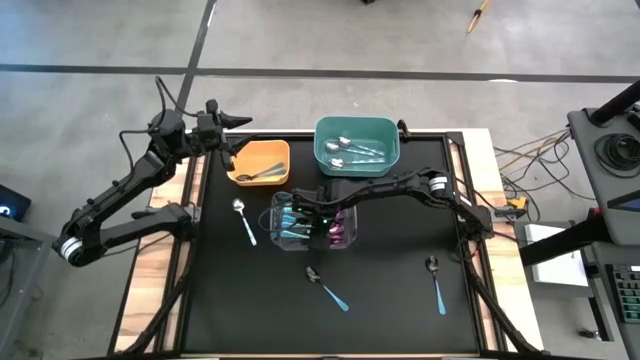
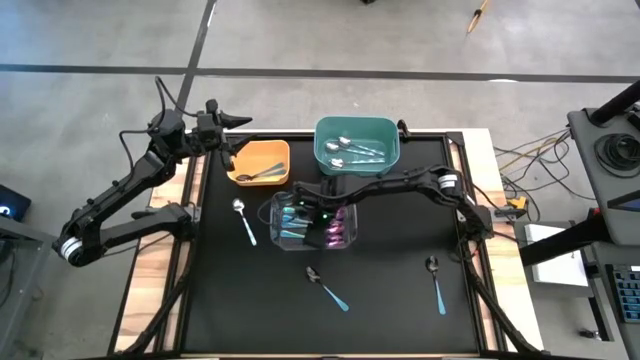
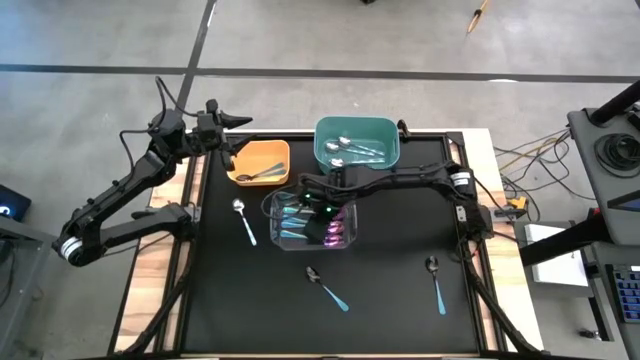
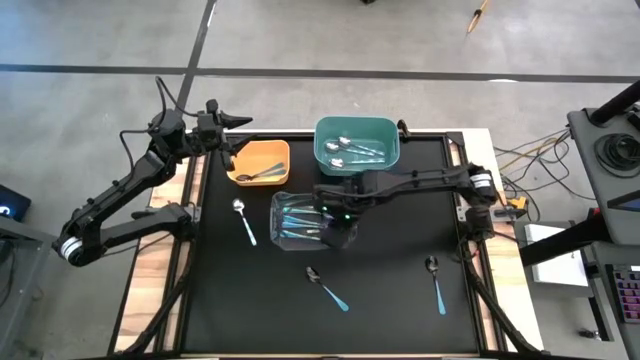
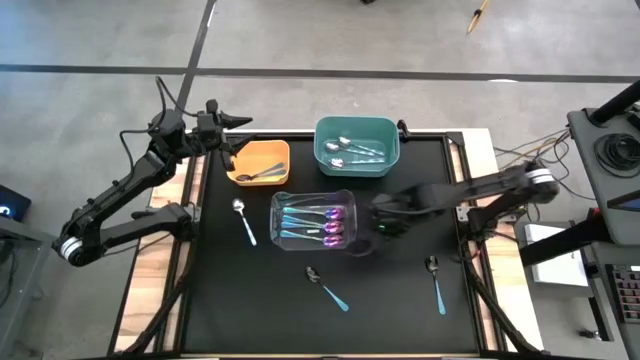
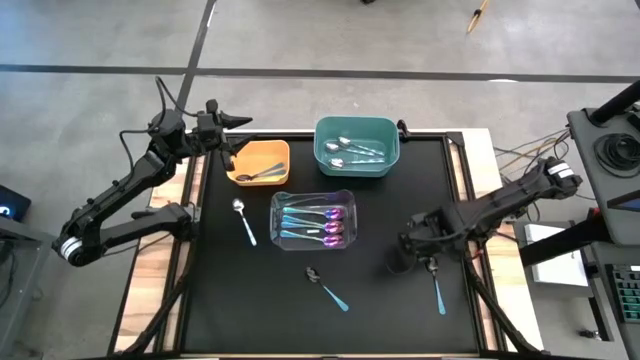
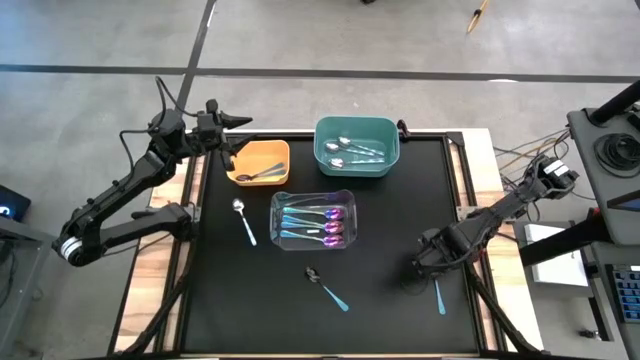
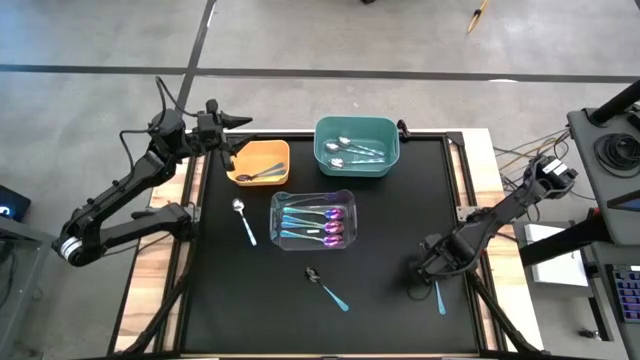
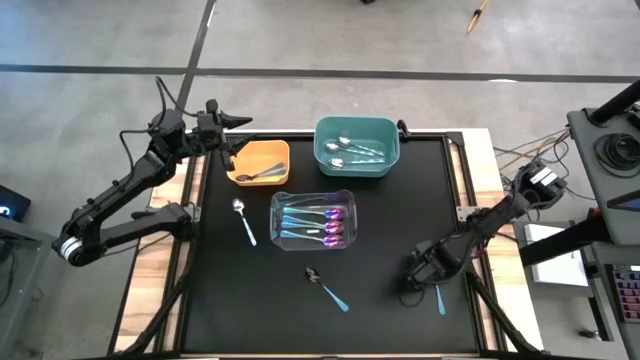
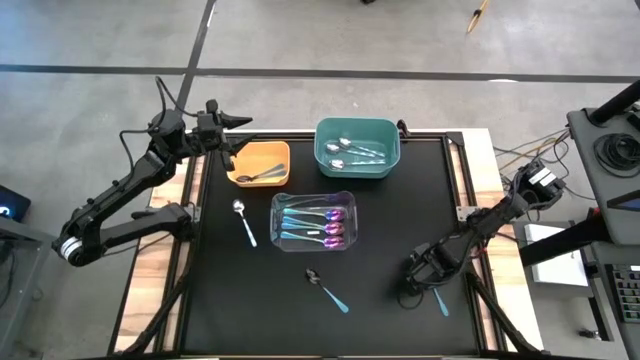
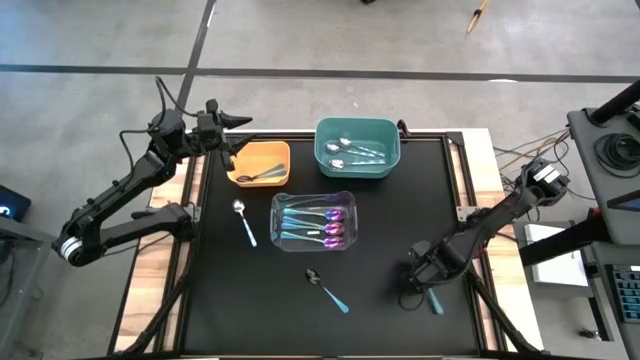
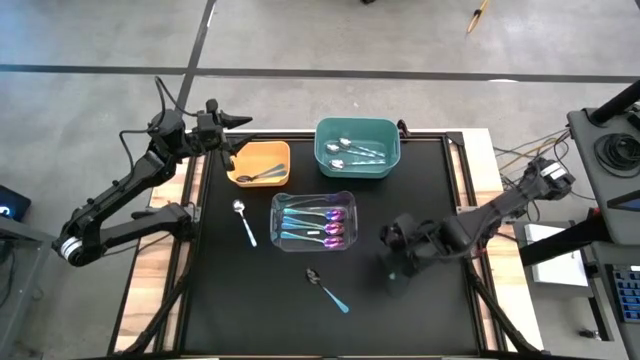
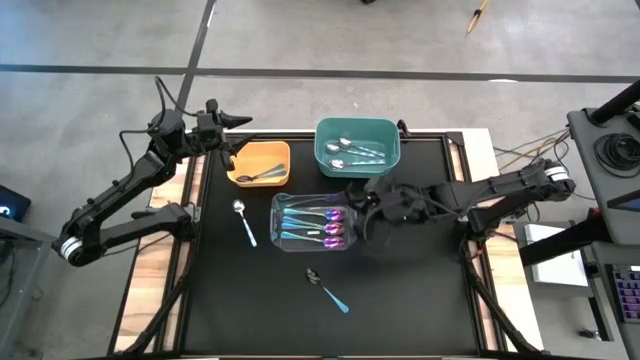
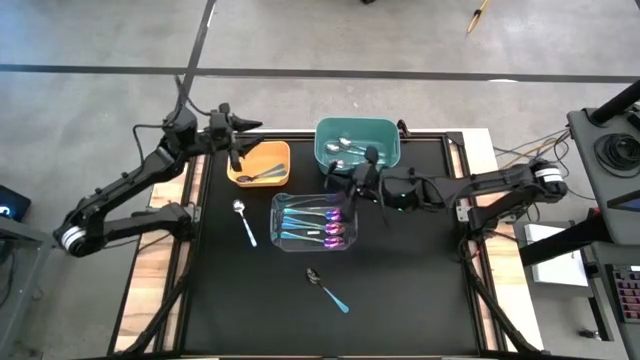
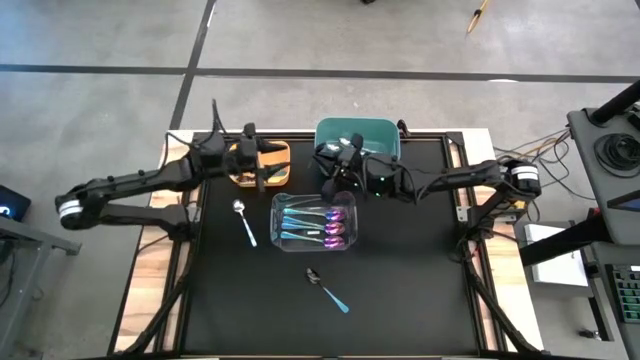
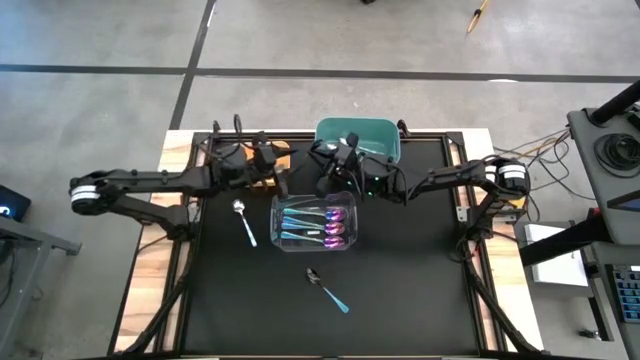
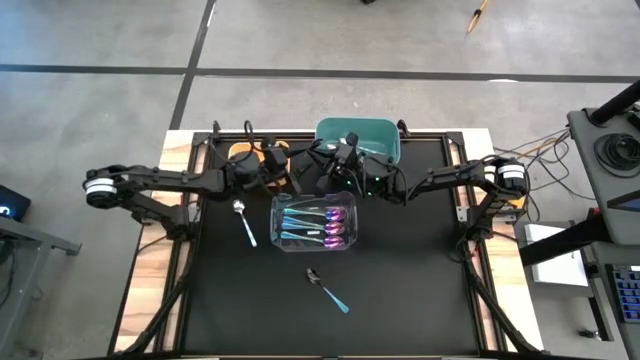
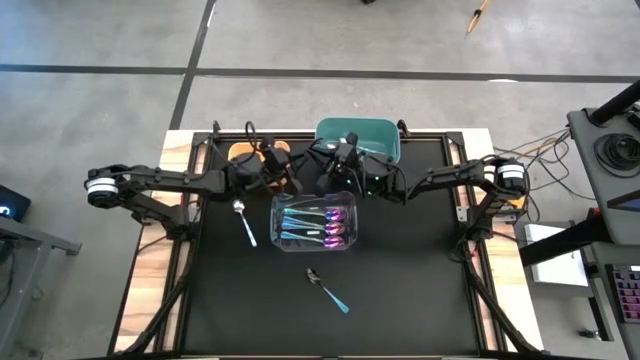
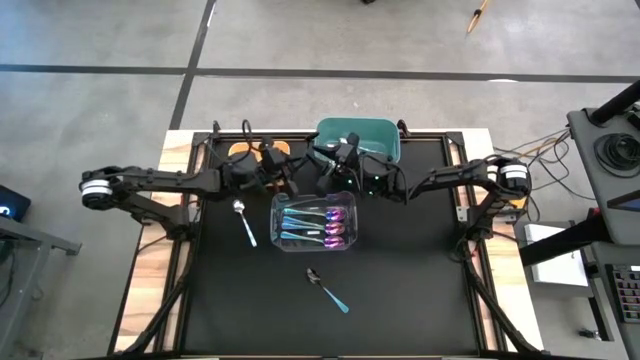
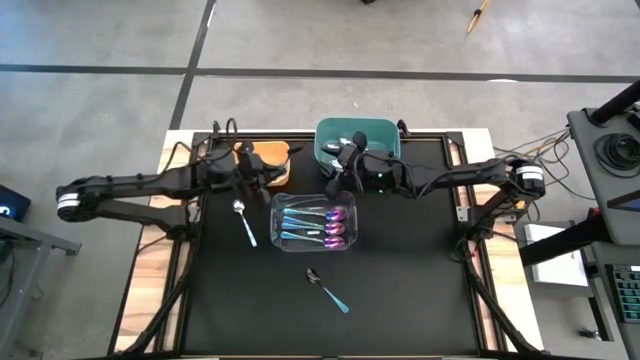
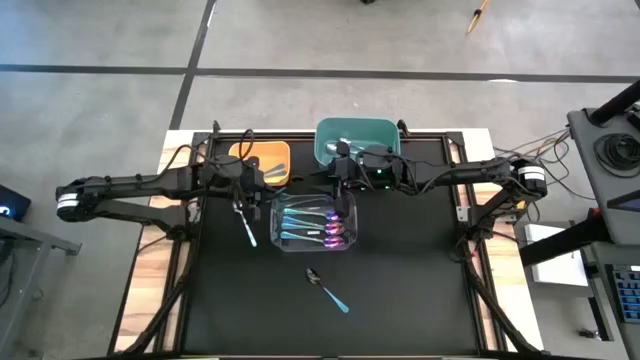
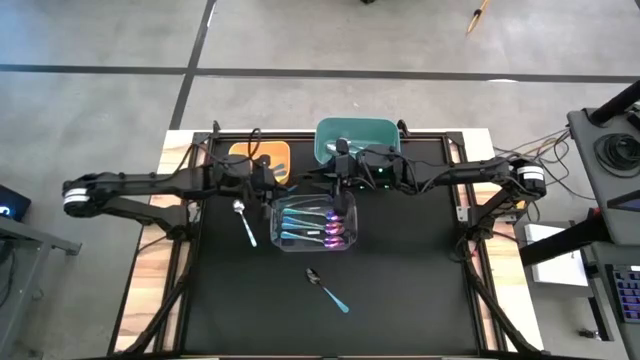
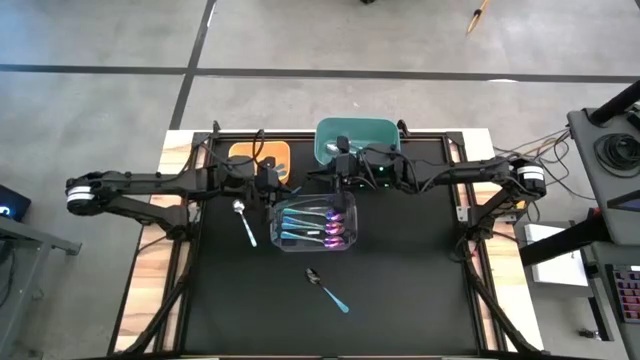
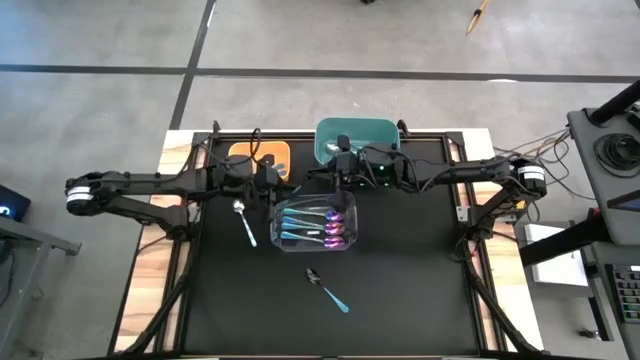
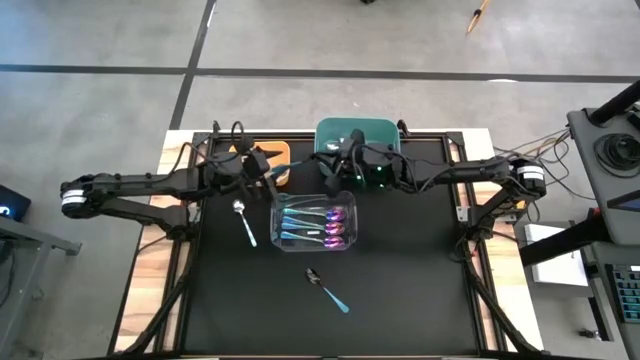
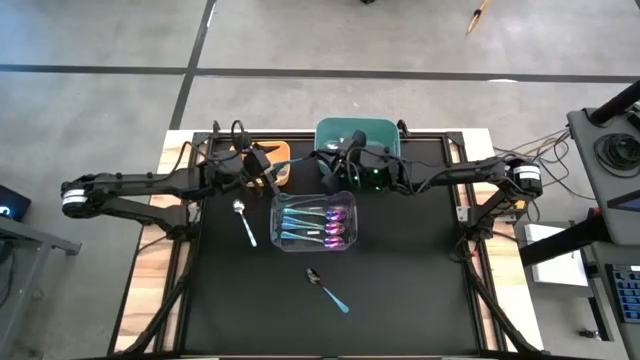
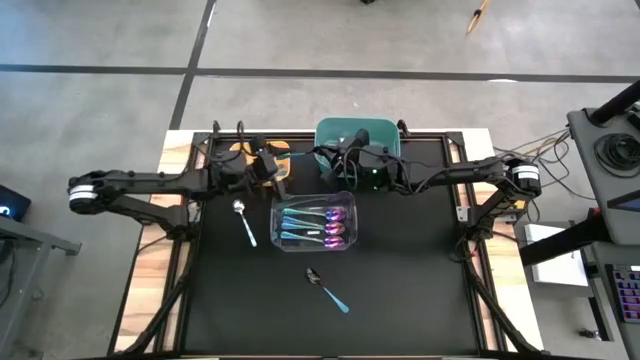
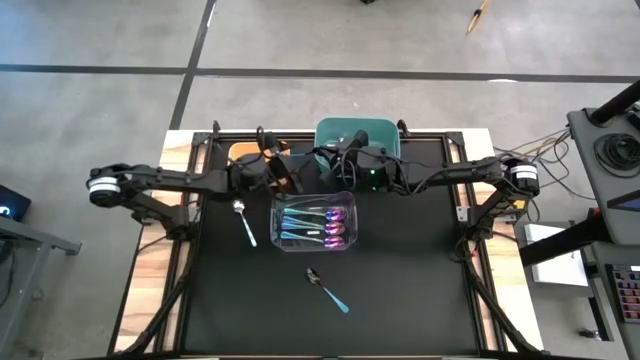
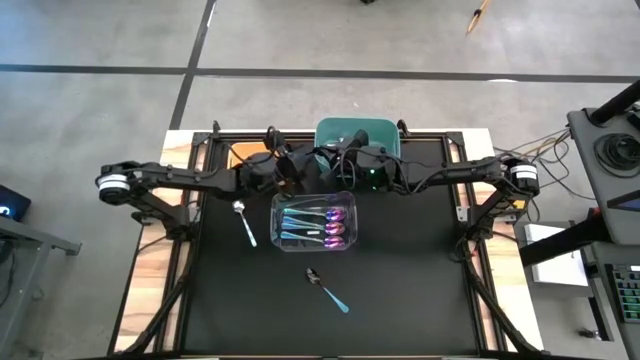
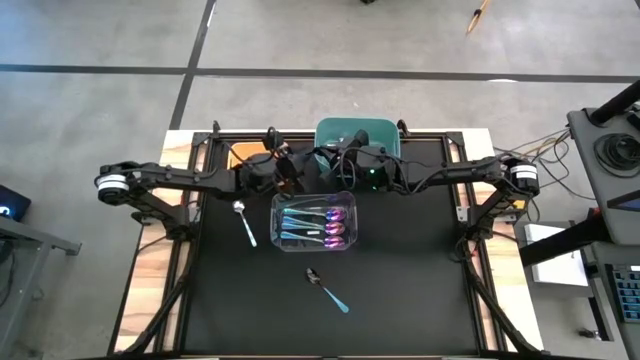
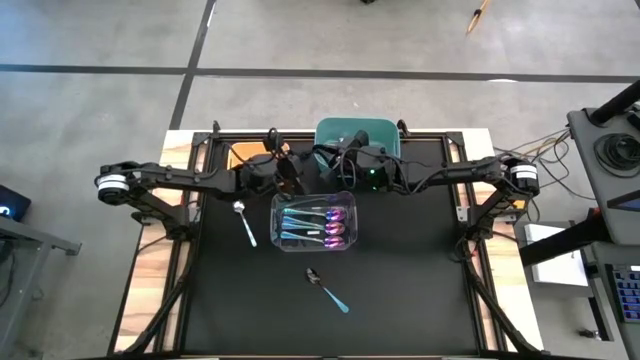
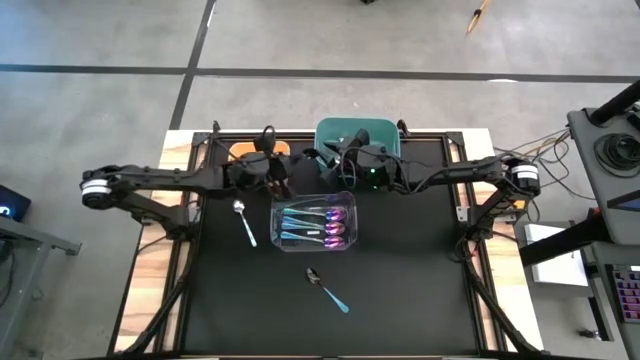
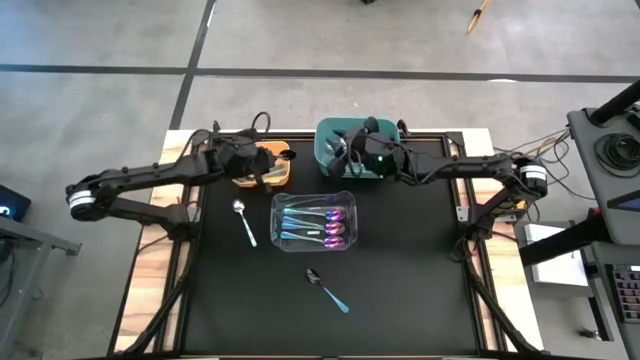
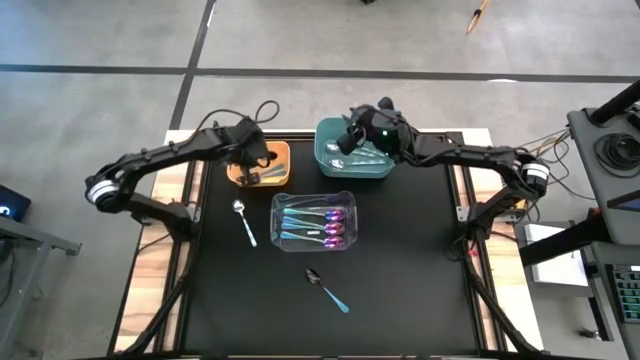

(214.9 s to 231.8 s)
Task: Sort silverware by color (type)
Put the blue spoon into the yellow bin

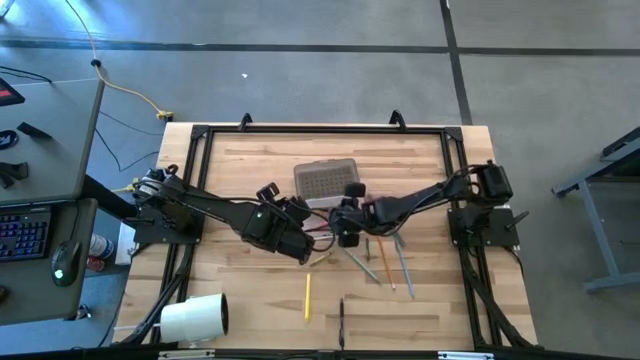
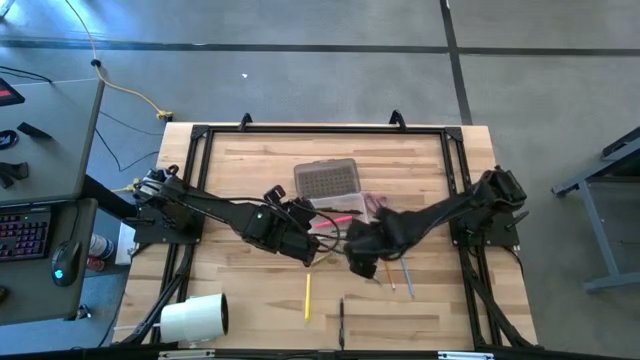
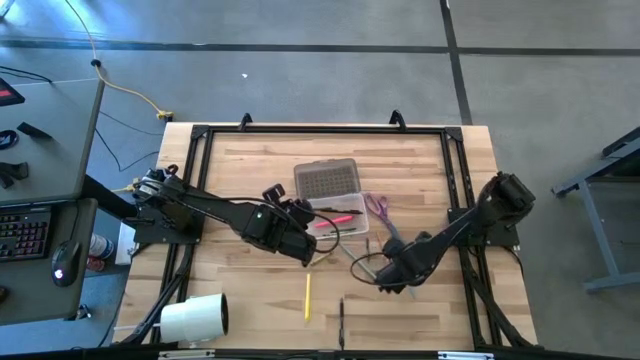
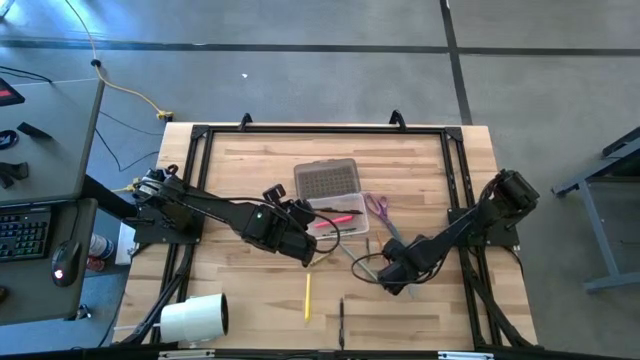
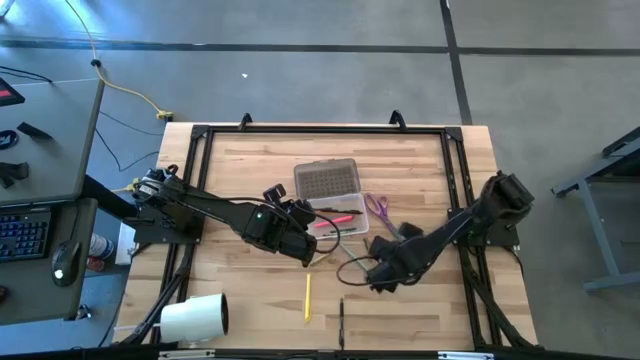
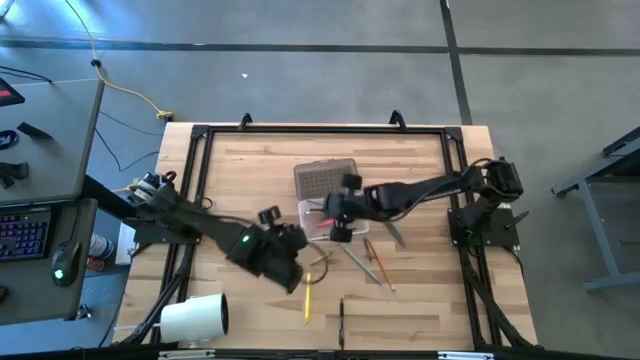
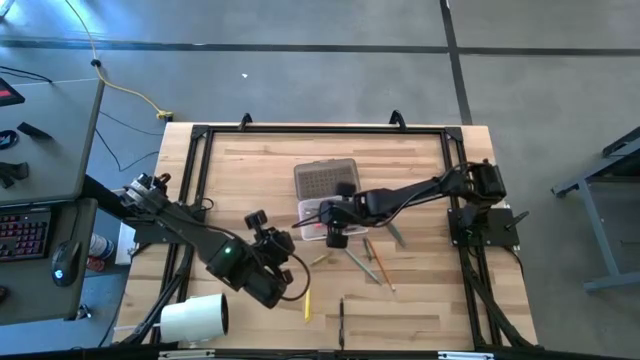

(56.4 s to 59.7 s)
Task: Pick & place school supplies into a supply box
Put the blue pencil into the black supply box

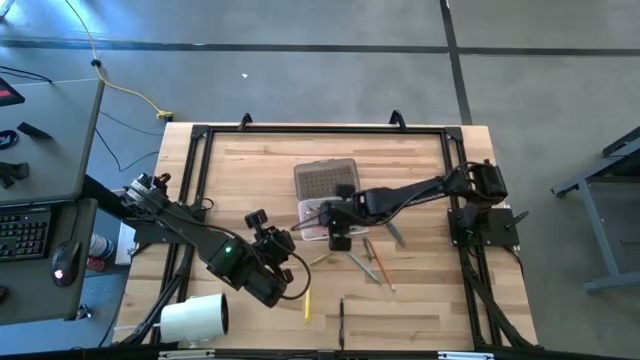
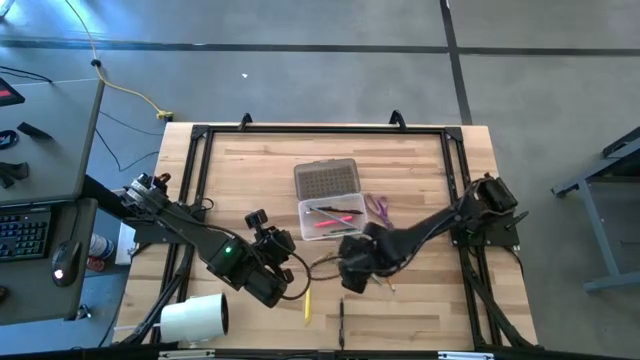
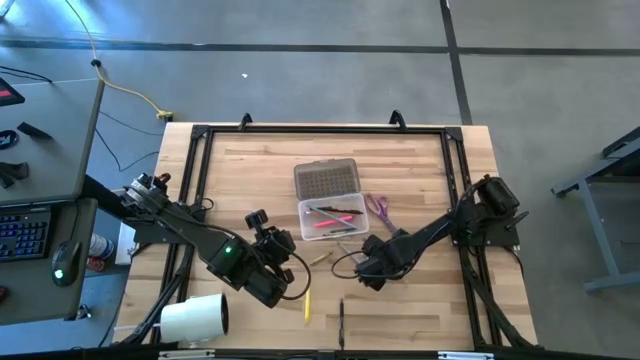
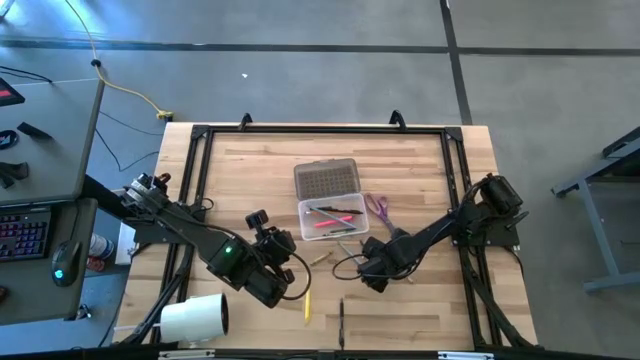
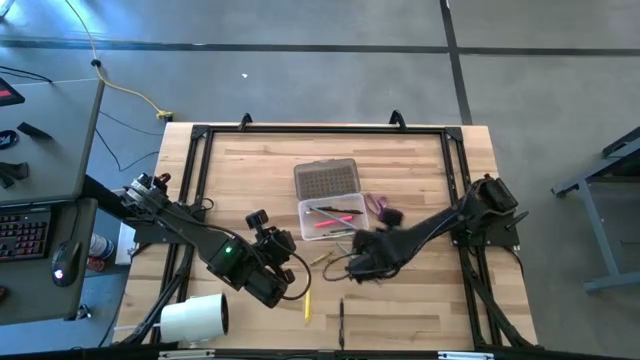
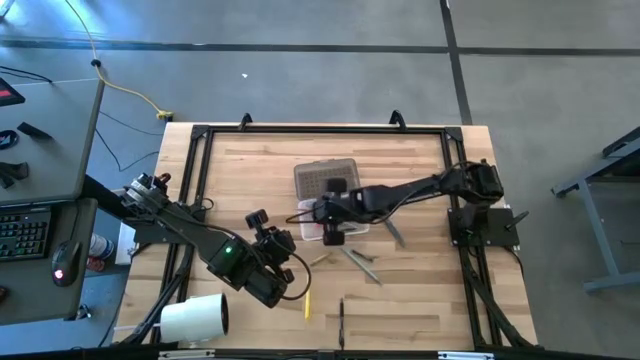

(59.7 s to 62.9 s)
Put the orange pencil into the black supply box
